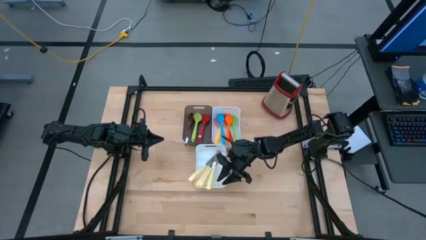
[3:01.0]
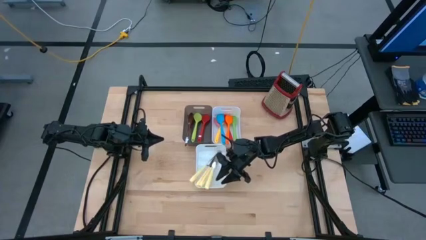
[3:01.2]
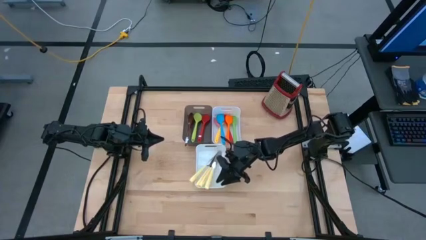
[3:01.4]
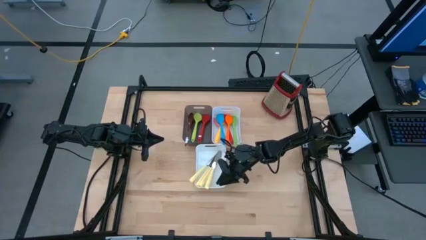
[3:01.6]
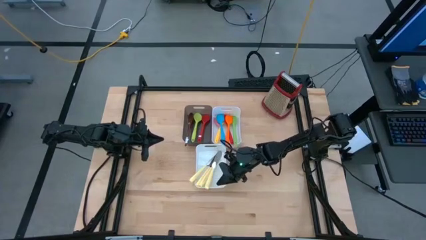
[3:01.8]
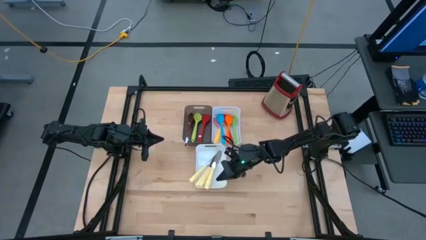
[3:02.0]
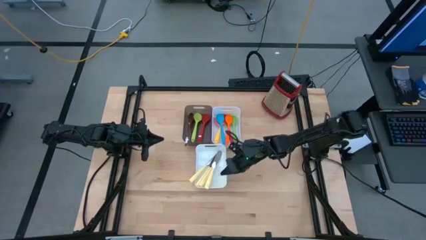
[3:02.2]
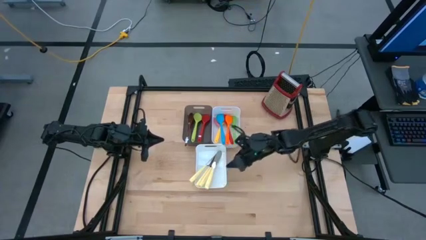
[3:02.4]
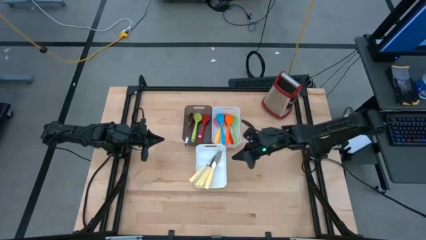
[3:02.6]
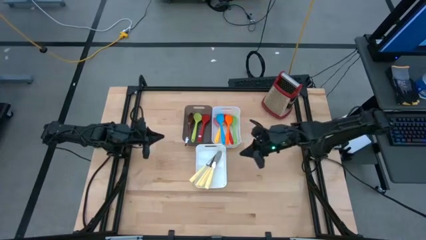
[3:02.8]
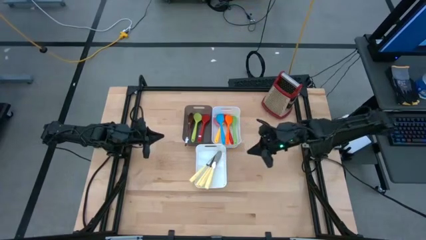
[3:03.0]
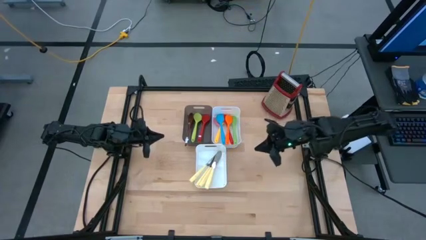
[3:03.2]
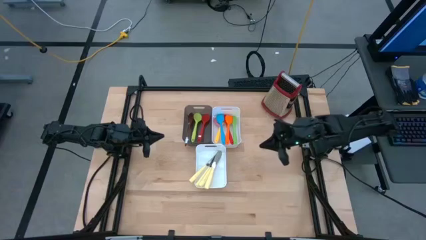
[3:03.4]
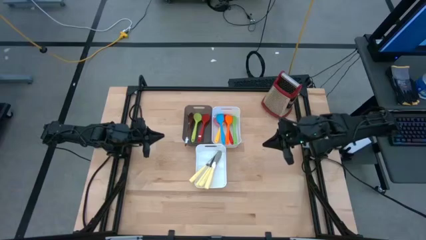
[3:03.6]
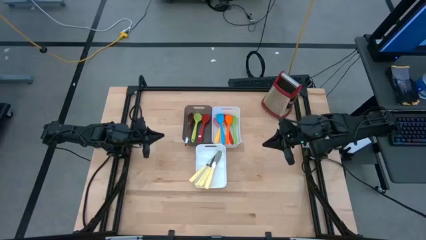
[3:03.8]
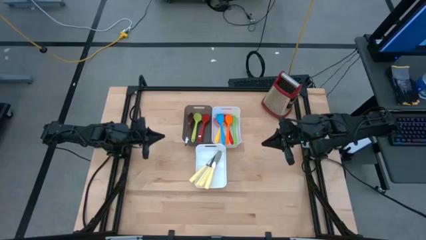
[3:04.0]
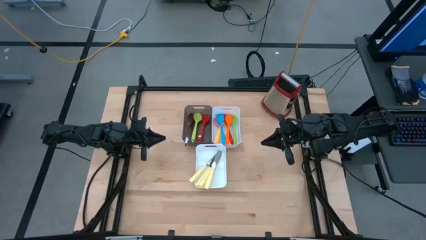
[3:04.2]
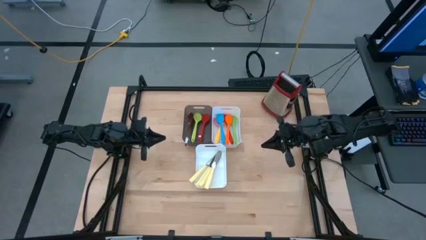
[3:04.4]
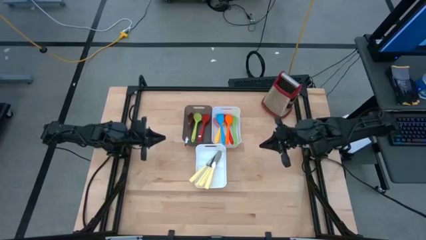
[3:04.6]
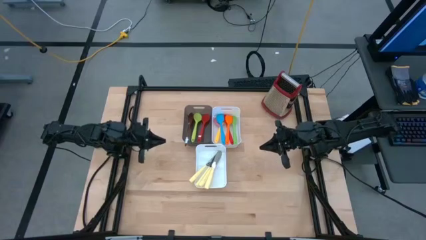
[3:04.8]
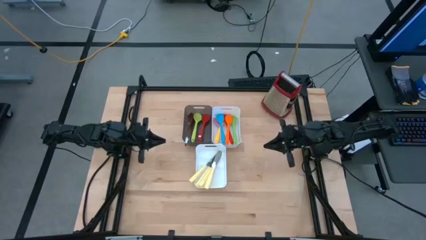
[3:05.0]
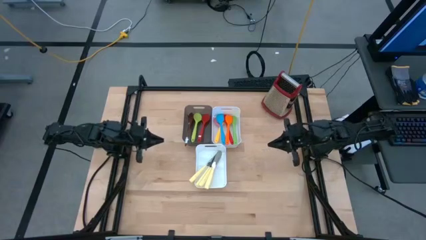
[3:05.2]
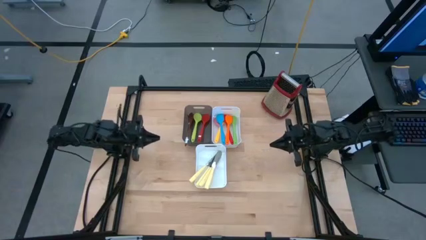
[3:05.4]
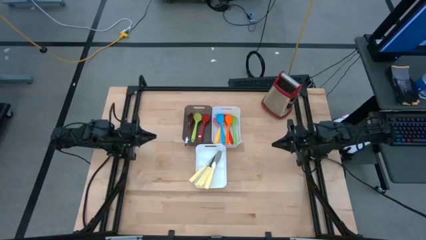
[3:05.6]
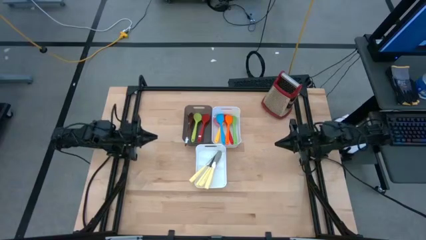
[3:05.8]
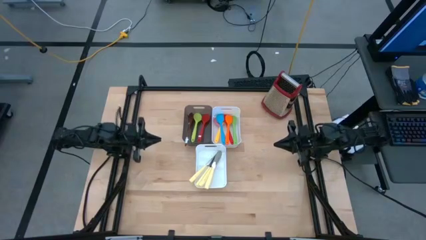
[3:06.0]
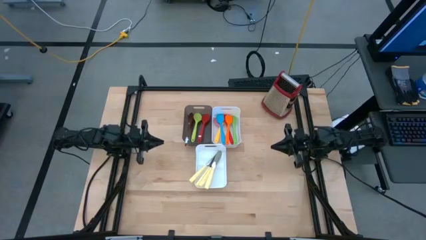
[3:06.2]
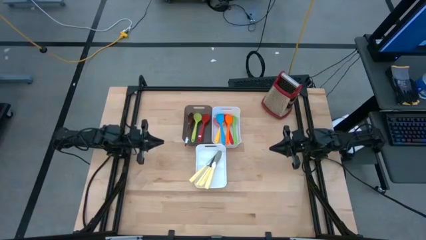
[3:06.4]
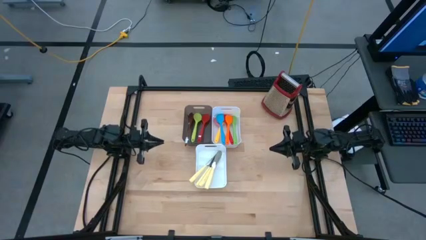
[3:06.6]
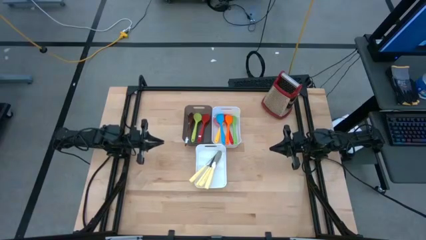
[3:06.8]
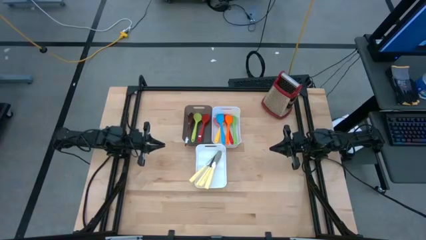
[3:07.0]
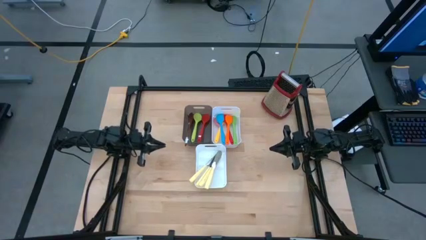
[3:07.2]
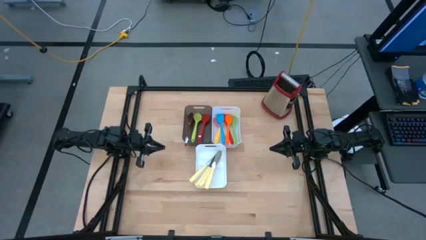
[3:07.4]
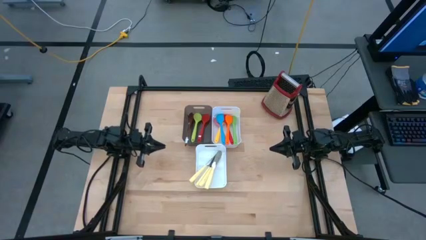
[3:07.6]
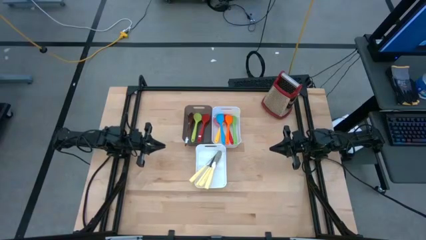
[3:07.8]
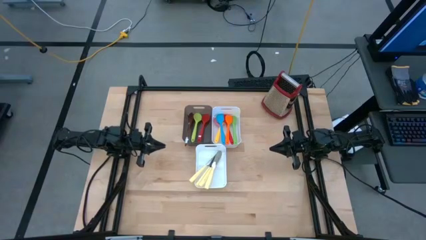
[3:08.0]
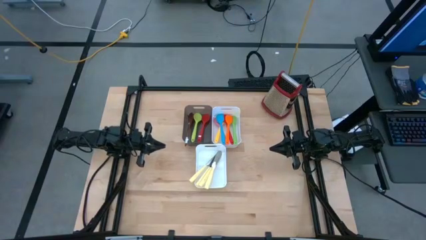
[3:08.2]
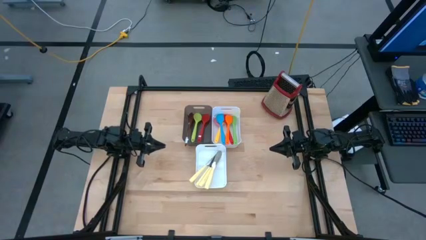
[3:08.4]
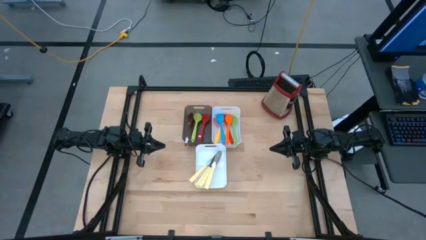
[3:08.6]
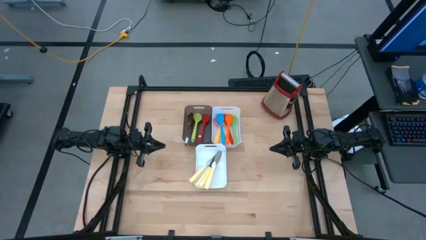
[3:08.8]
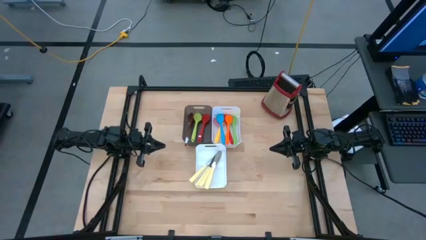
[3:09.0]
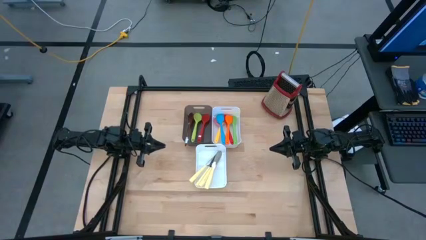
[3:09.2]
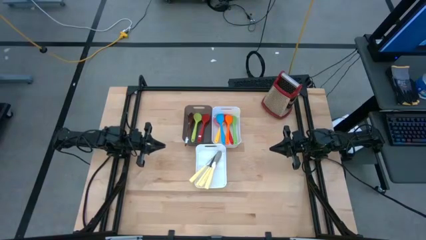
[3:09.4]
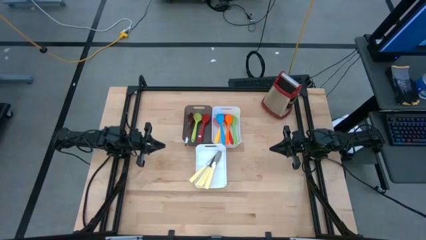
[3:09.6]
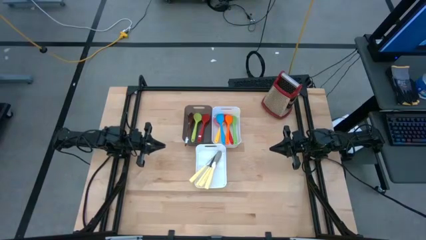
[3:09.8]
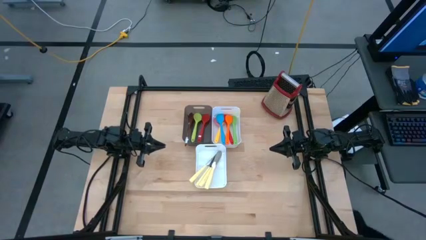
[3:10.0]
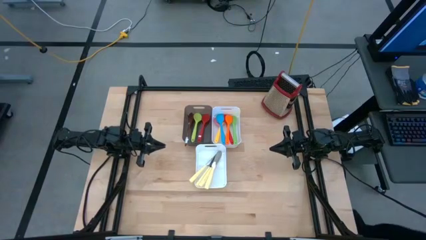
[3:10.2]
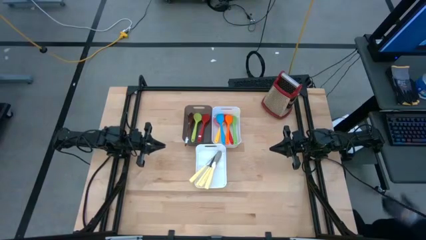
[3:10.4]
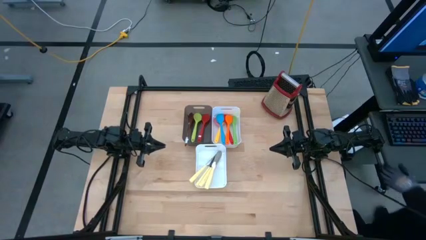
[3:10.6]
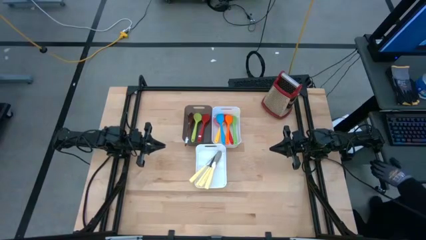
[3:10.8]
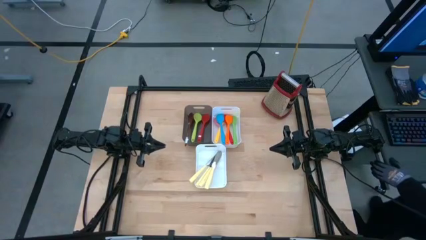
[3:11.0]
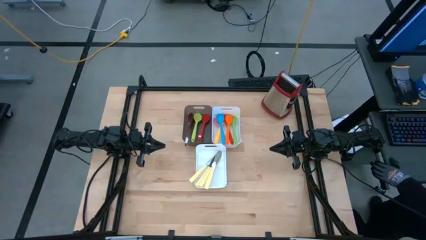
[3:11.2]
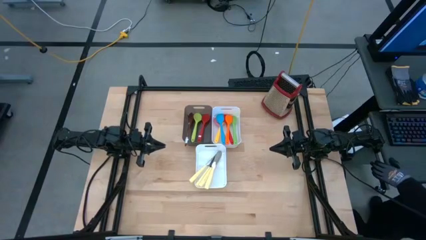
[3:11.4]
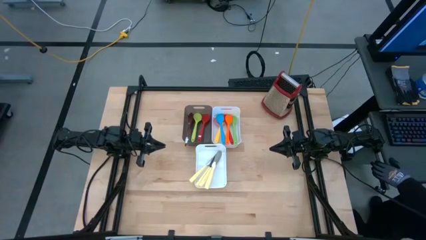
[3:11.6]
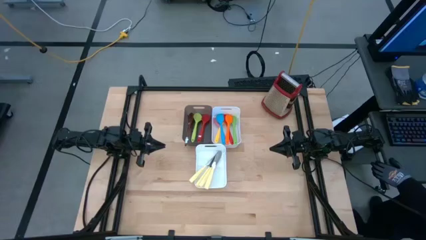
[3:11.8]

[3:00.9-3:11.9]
Task: Pick & Place Kitchen Items
Return to Home Position
